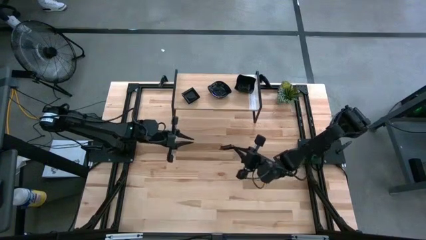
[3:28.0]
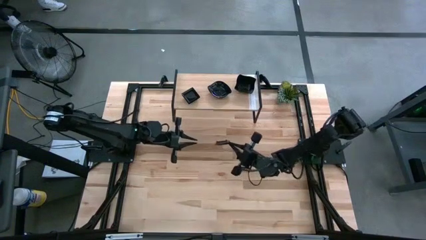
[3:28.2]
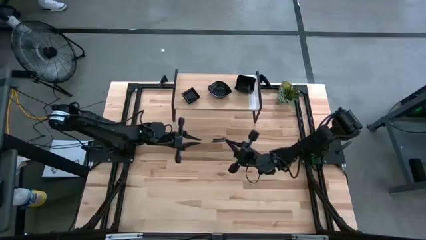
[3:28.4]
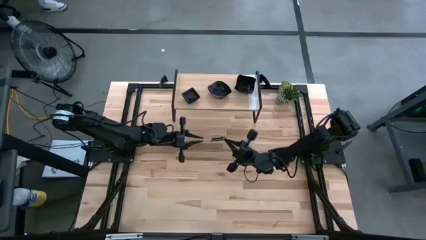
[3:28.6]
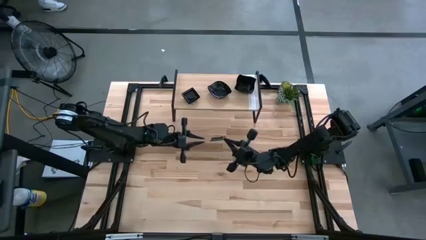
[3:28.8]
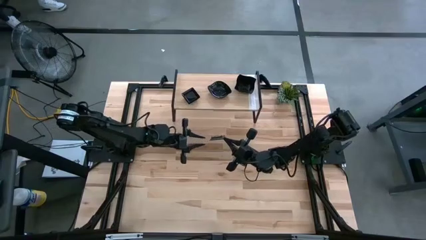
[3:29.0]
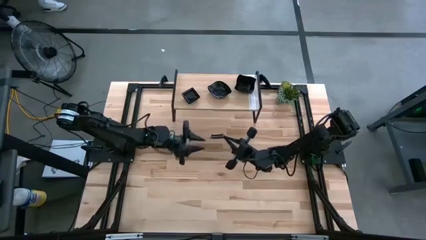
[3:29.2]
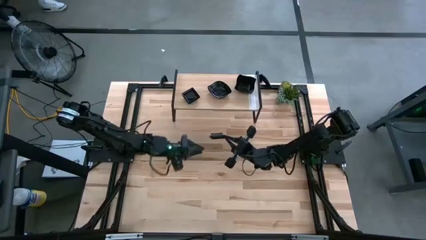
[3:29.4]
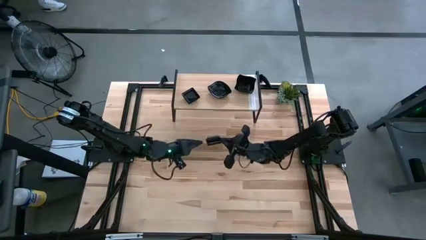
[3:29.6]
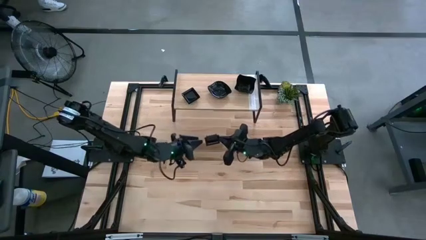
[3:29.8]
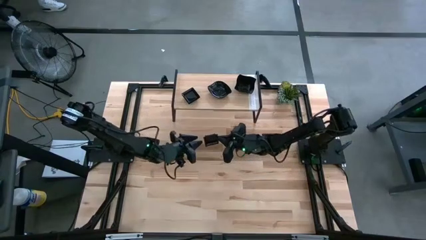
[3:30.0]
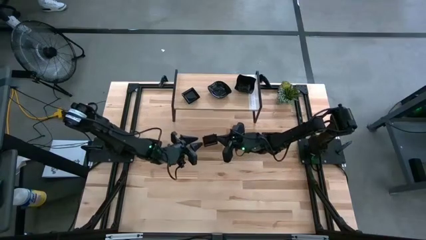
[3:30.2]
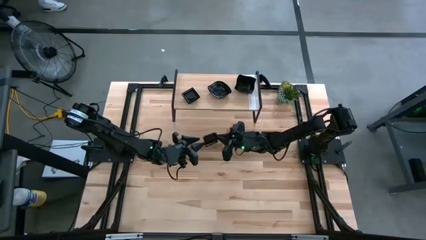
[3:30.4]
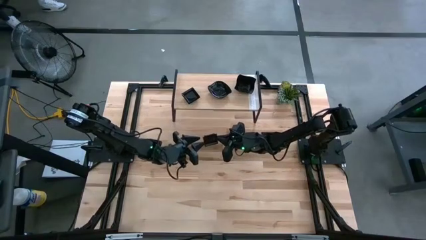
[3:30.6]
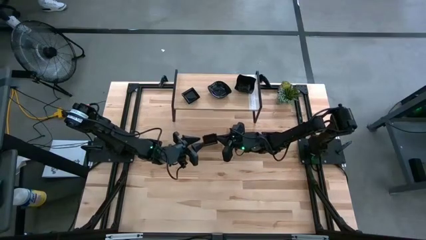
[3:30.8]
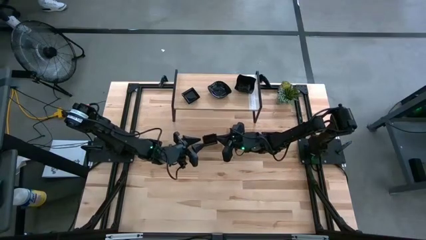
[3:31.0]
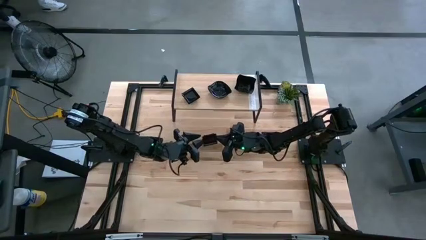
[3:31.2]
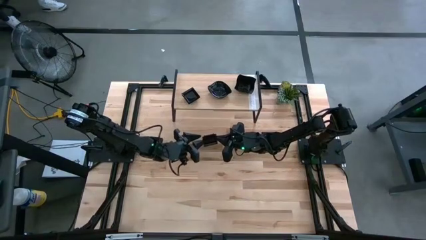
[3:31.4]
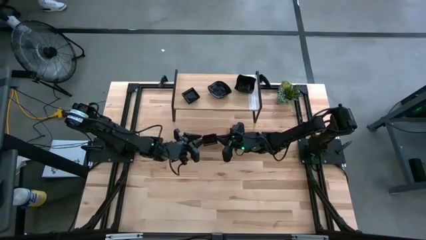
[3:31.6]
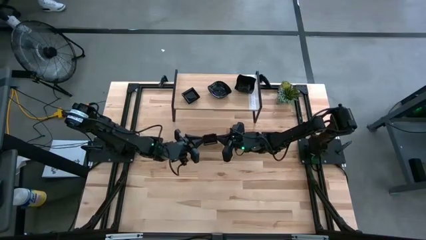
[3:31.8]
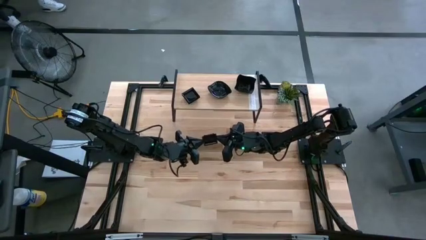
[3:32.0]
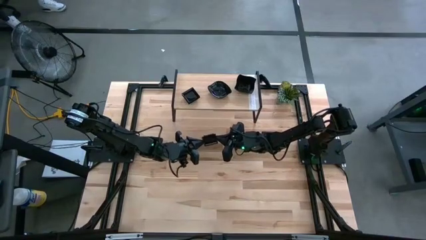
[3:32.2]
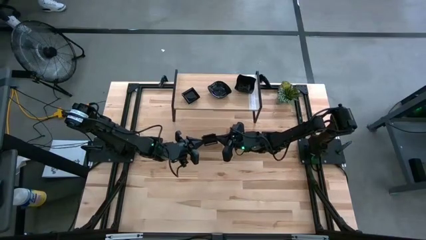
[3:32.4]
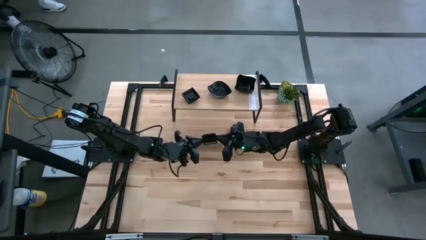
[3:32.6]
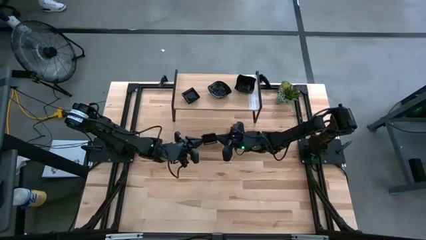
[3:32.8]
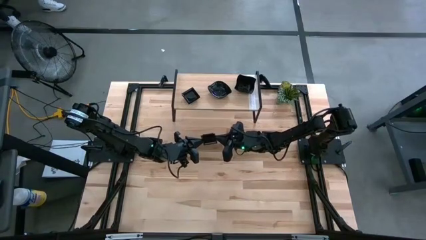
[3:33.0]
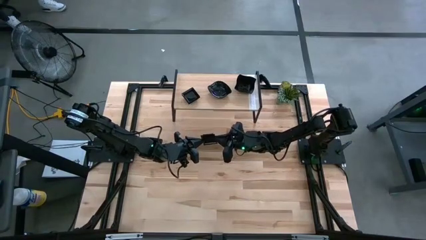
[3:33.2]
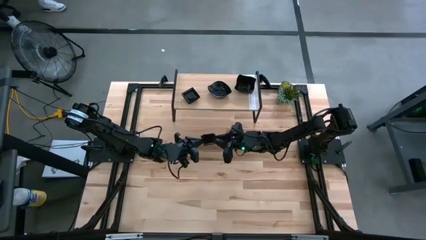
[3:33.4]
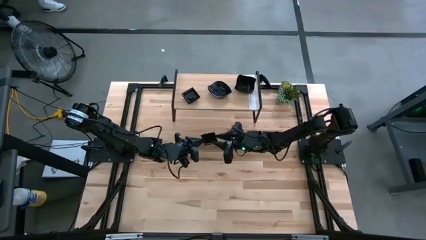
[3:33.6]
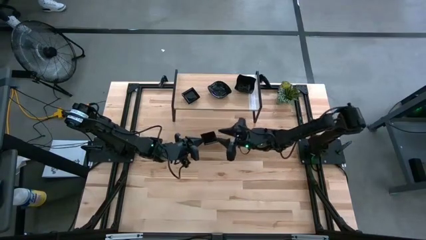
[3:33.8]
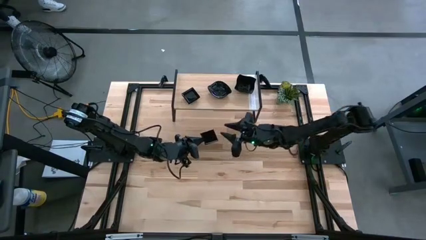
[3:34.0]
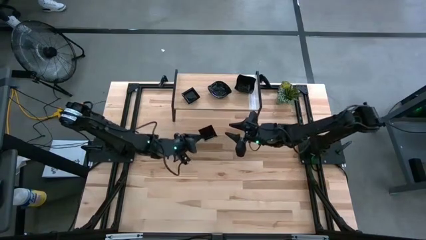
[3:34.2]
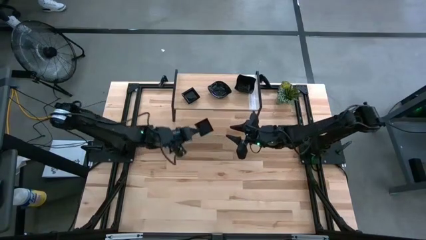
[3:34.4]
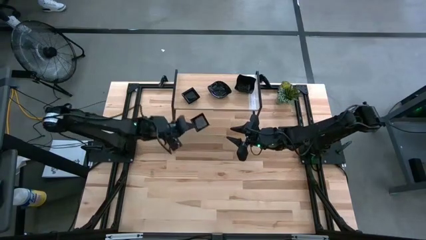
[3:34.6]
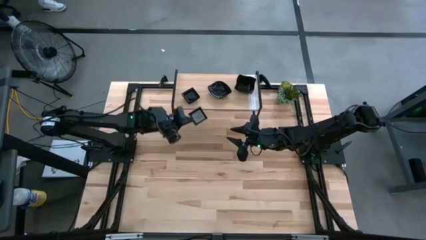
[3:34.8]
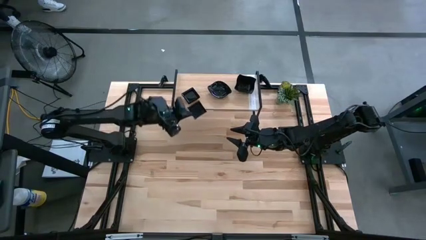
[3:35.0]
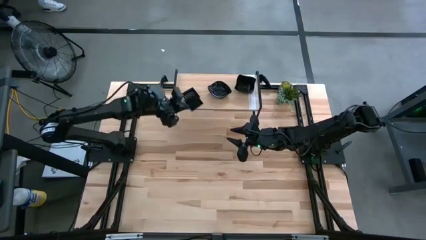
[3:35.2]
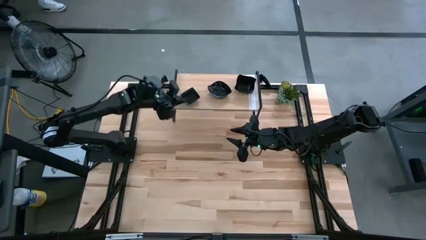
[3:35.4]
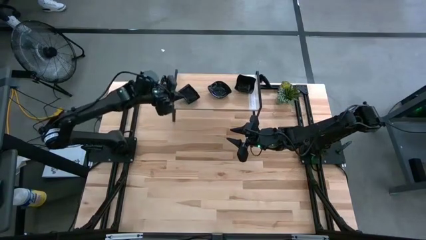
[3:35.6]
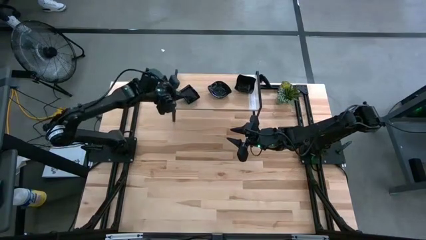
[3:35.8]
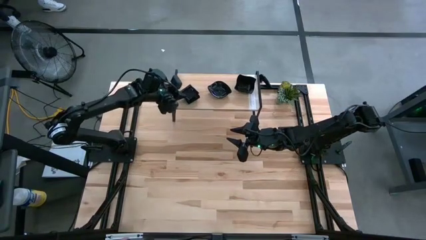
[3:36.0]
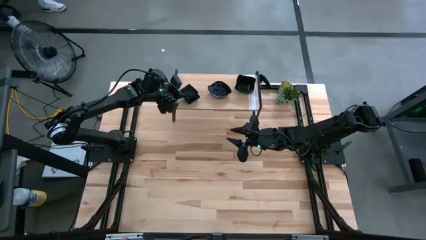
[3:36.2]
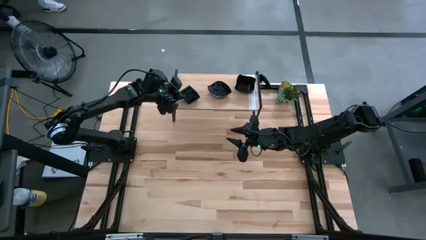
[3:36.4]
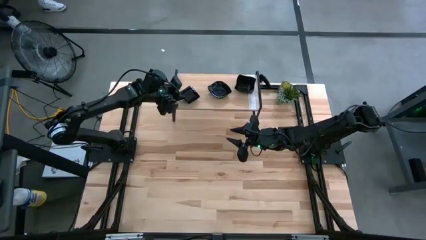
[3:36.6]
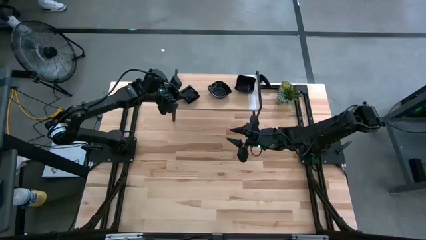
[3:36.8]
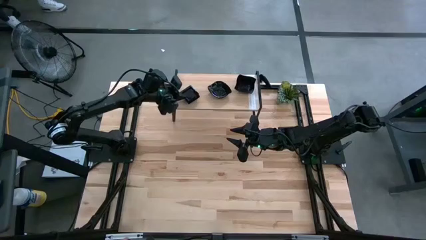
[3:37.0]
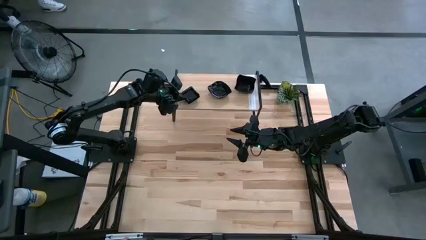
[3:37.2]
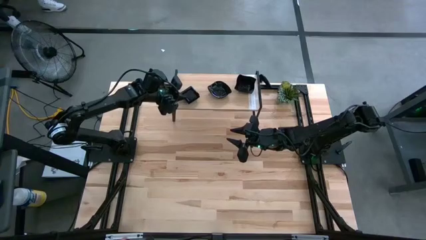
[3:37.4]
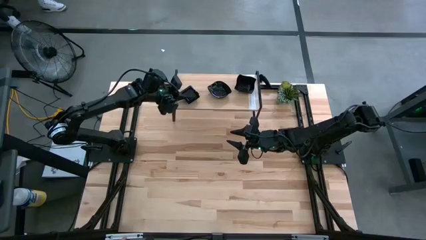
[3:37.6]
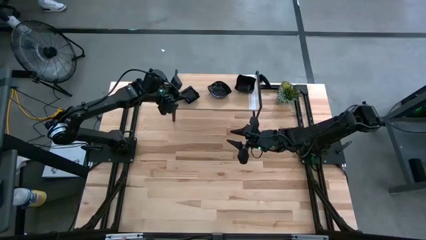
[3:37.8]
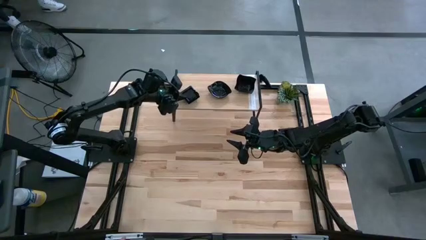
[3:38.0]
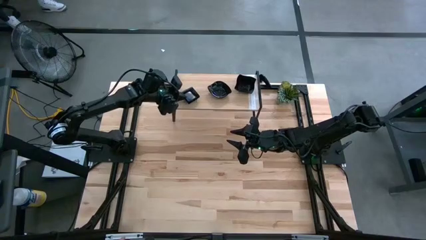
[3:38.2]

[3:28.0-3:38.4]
Task: Pick & Place Mini shaped plates
Stack the square plate on top of the other square plates on the shelf

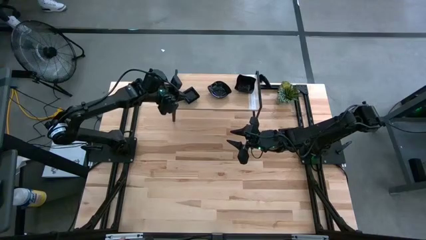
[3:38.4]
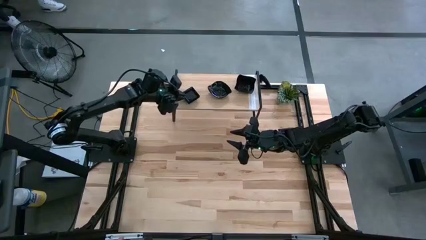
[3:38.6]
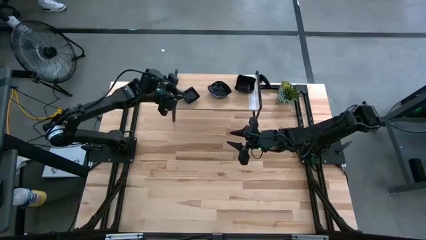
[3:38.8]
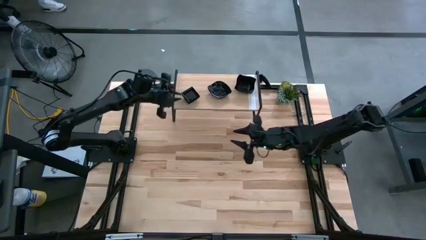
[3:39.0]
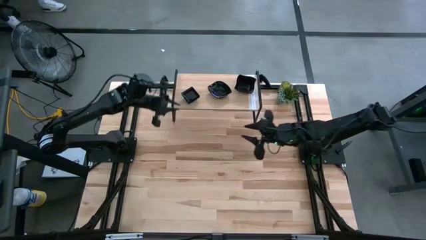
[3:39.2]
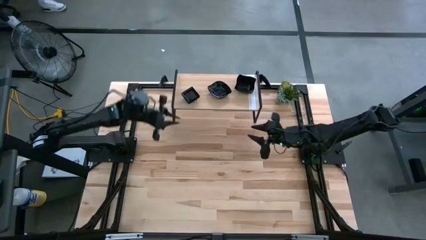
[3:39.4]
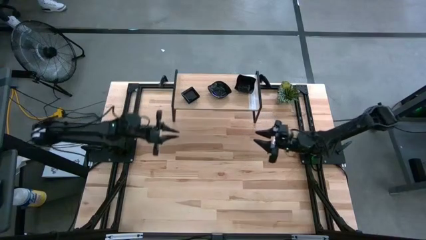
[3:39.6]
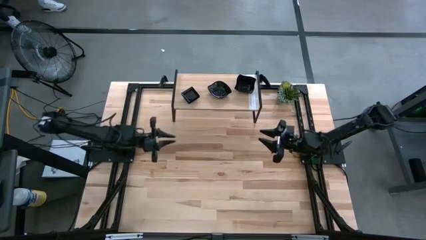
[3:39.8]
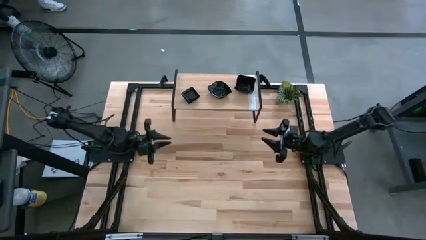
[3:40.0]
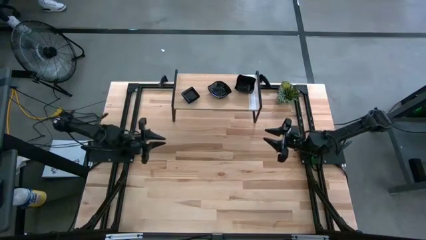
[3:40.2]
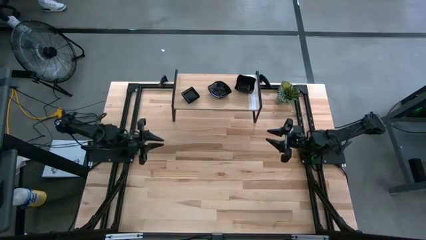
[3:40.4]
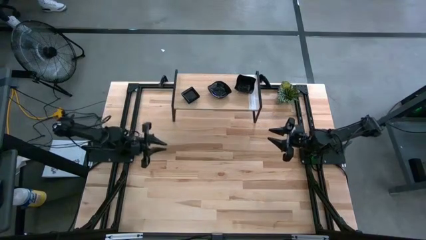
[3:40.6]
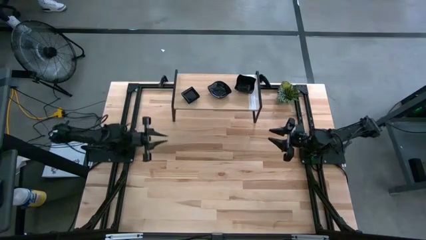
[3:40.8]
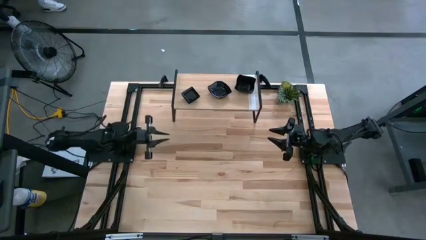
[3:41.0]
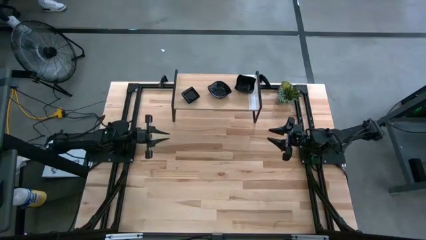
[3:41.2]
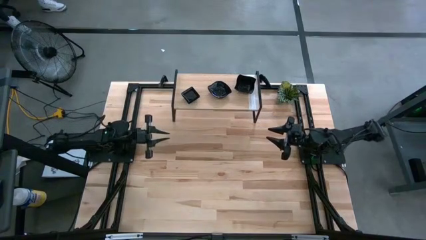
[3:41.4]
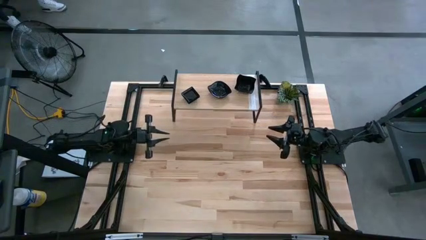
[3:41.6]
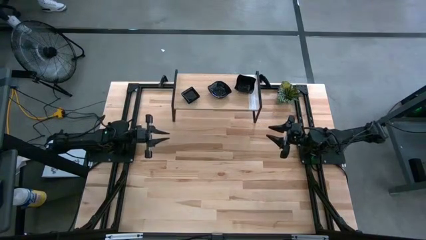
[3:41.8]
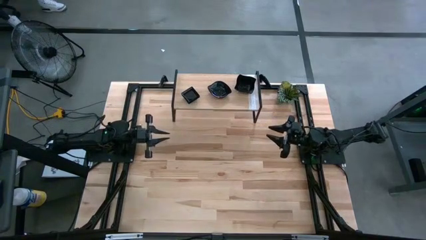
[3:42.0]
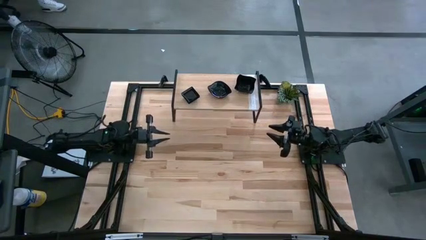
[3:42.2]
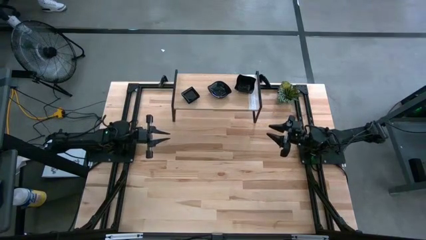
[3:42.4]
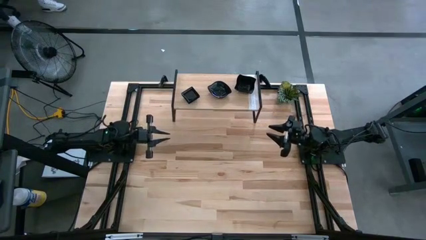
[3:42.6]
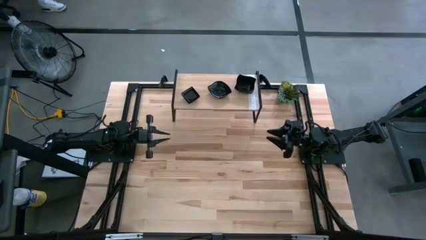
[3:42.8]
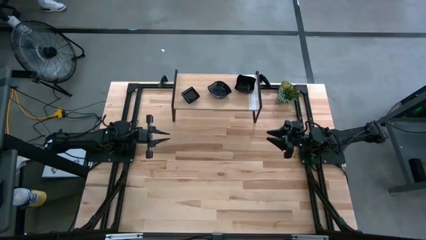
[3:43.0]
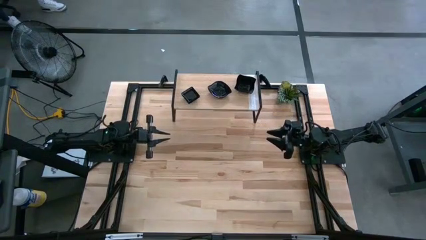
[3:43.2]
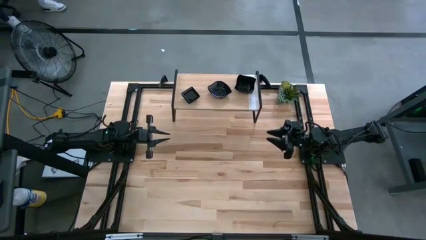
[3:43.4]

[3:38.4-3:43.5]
Return to Home Position
